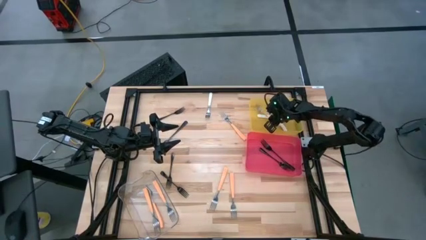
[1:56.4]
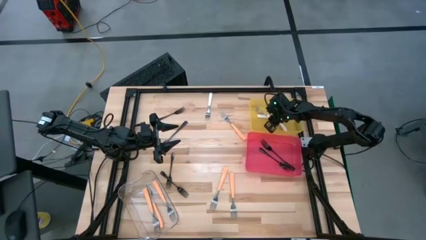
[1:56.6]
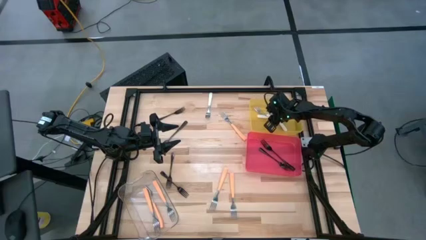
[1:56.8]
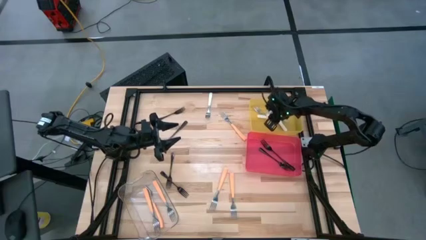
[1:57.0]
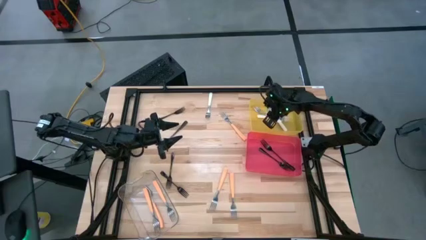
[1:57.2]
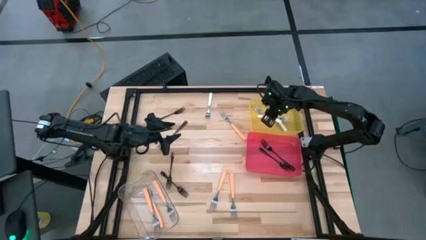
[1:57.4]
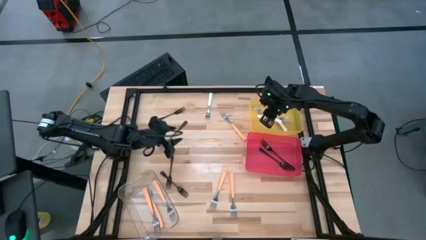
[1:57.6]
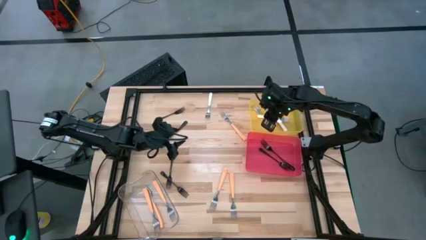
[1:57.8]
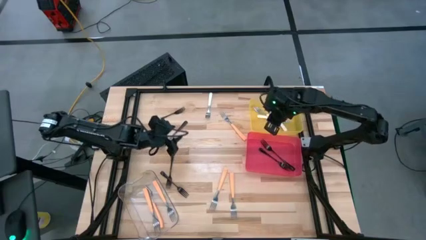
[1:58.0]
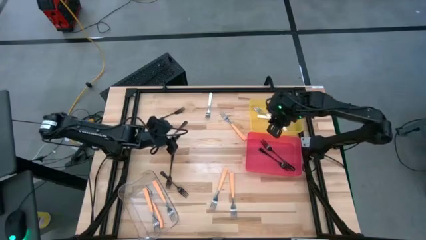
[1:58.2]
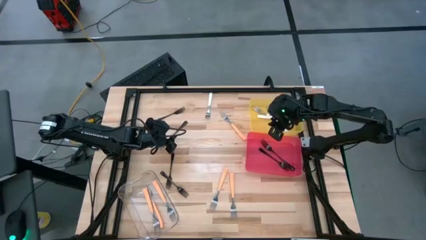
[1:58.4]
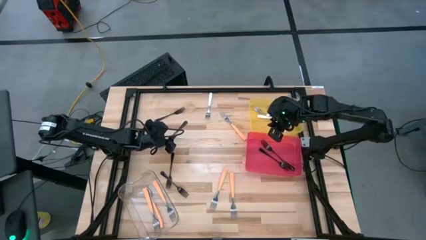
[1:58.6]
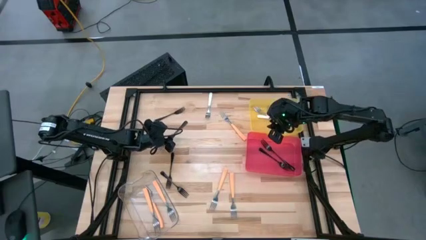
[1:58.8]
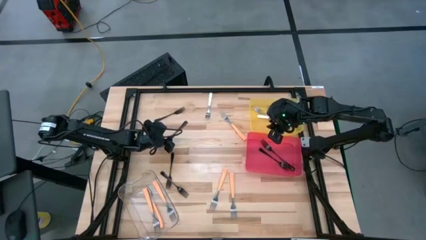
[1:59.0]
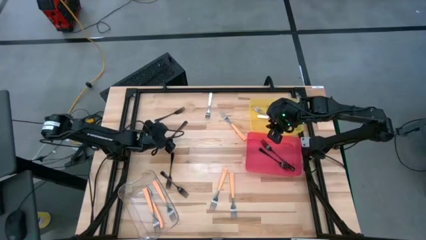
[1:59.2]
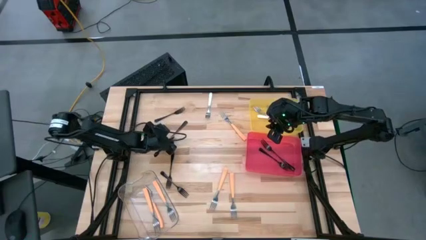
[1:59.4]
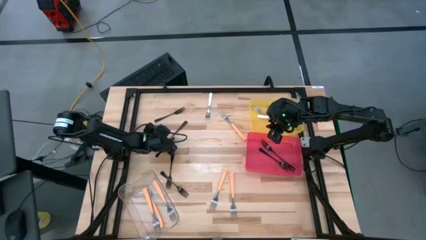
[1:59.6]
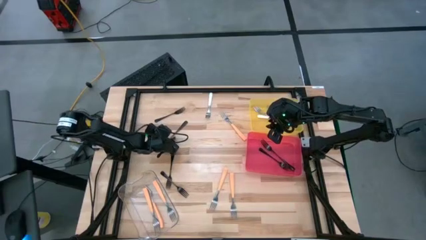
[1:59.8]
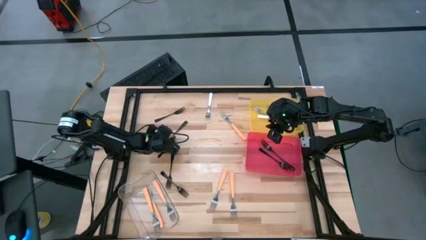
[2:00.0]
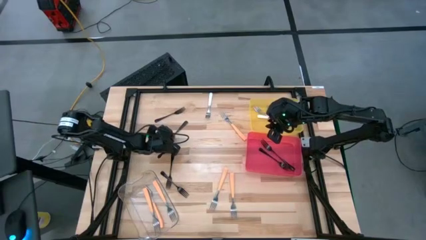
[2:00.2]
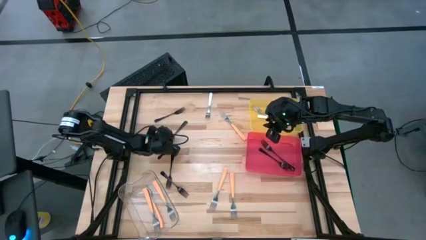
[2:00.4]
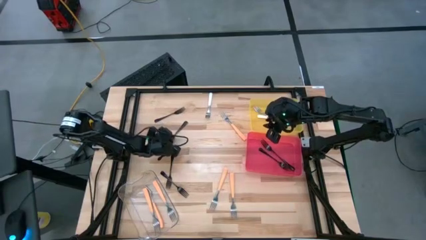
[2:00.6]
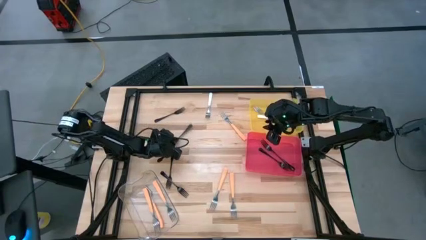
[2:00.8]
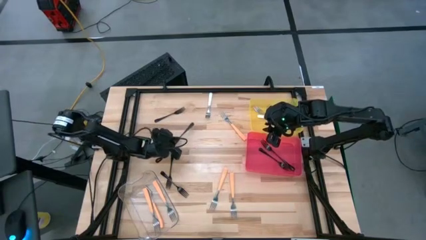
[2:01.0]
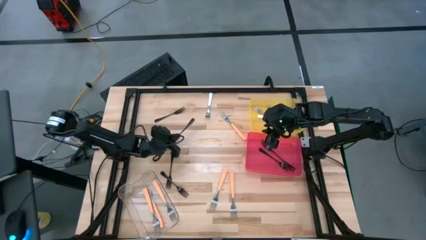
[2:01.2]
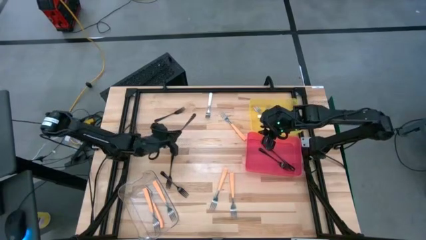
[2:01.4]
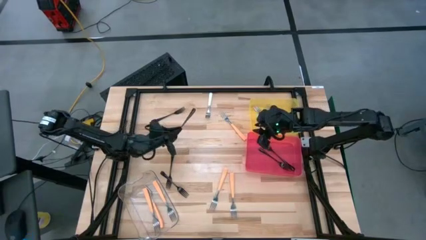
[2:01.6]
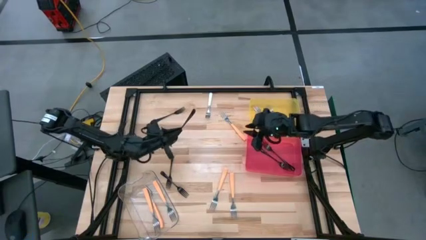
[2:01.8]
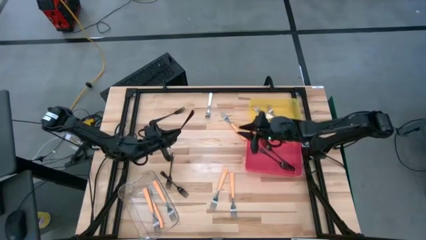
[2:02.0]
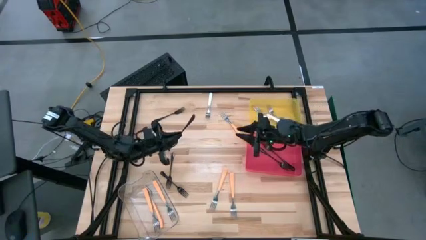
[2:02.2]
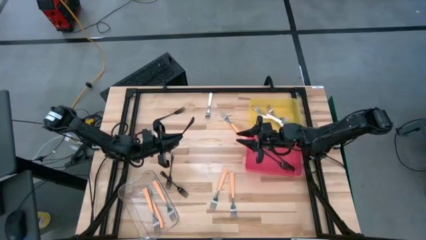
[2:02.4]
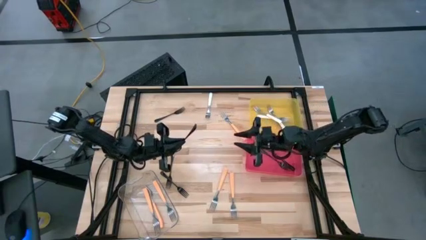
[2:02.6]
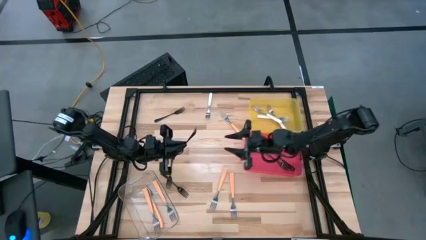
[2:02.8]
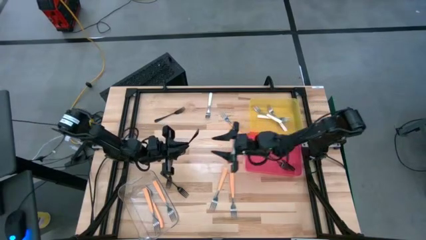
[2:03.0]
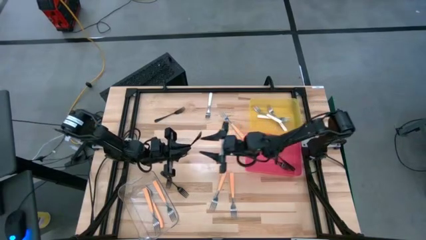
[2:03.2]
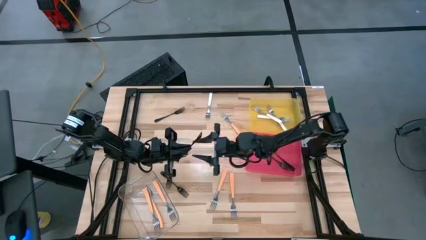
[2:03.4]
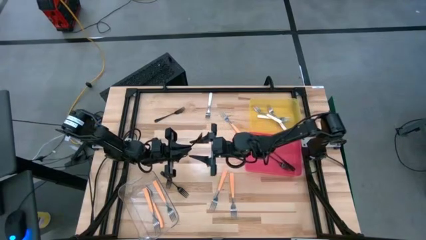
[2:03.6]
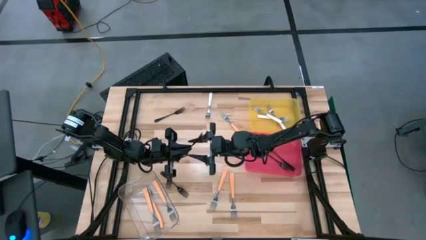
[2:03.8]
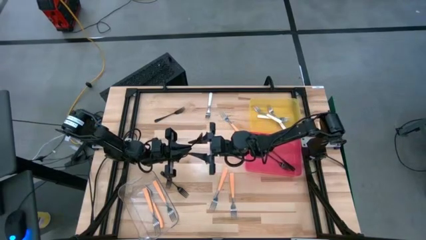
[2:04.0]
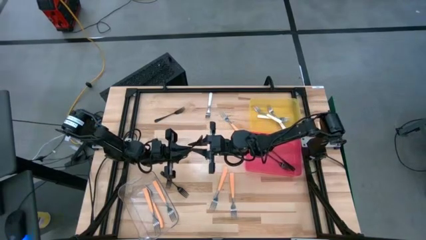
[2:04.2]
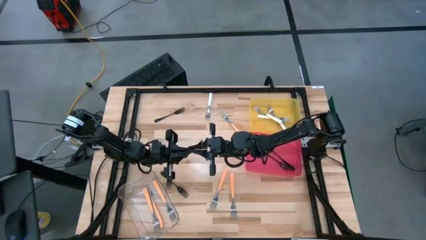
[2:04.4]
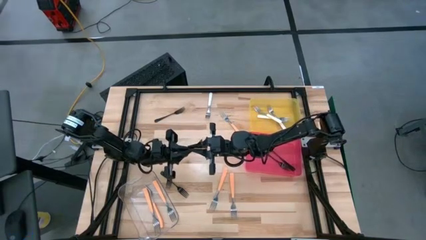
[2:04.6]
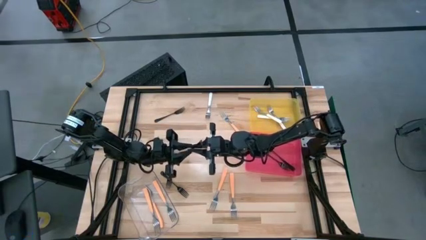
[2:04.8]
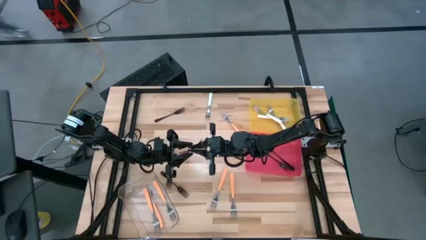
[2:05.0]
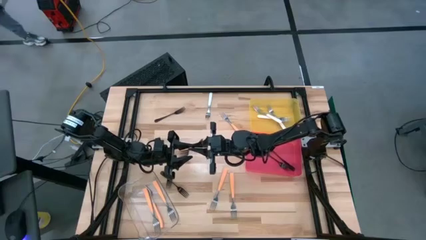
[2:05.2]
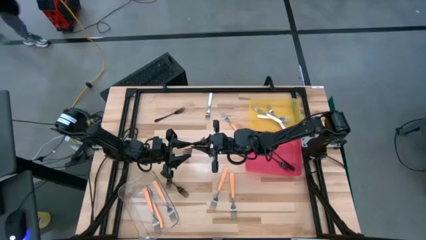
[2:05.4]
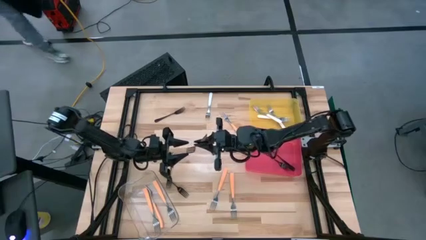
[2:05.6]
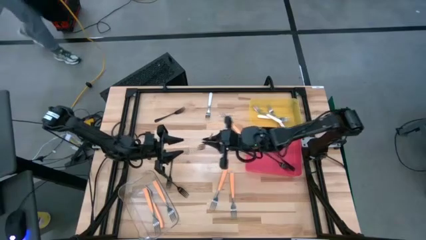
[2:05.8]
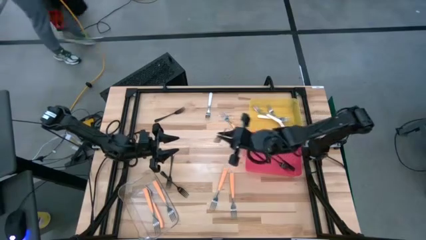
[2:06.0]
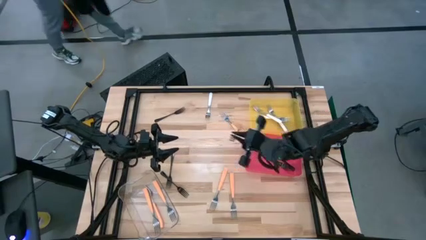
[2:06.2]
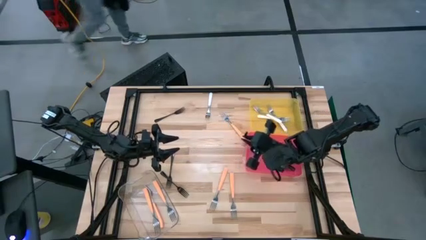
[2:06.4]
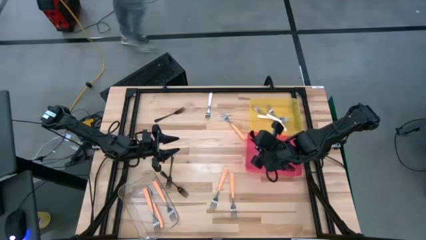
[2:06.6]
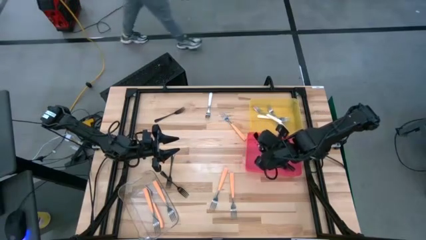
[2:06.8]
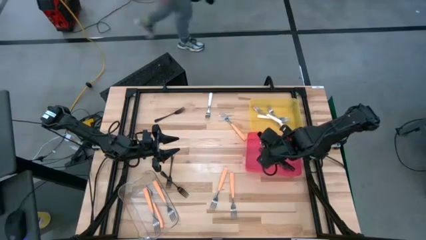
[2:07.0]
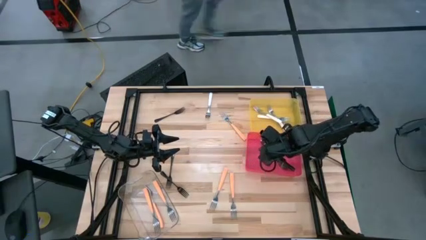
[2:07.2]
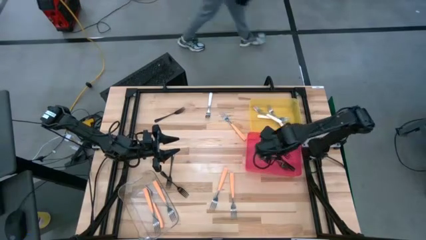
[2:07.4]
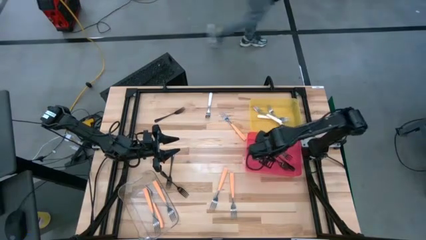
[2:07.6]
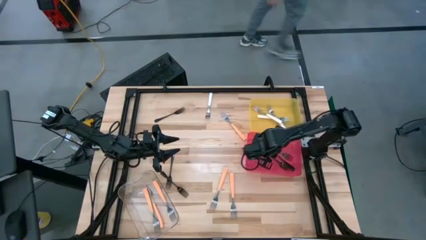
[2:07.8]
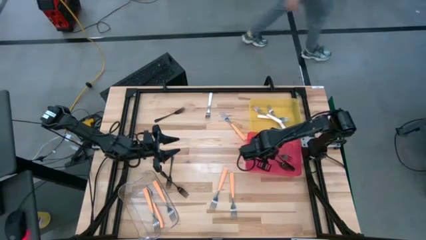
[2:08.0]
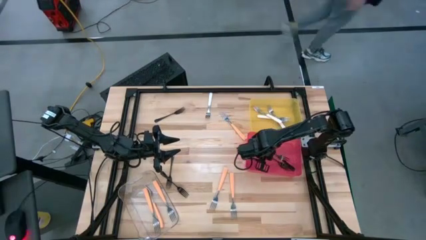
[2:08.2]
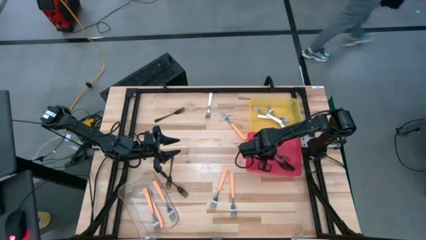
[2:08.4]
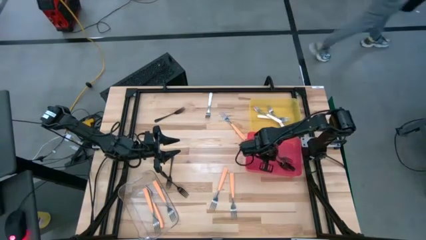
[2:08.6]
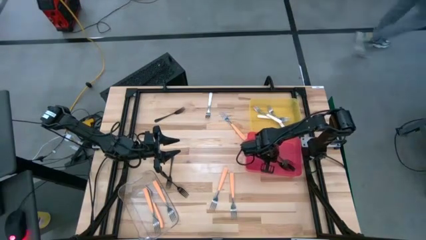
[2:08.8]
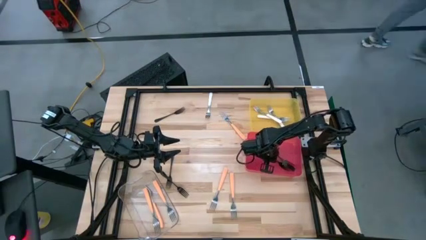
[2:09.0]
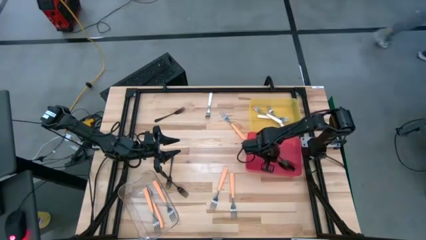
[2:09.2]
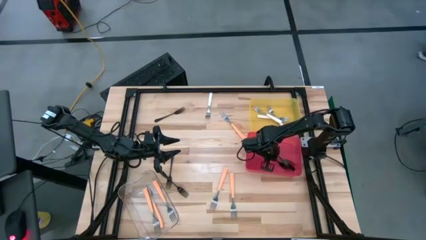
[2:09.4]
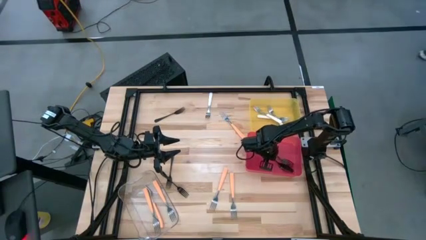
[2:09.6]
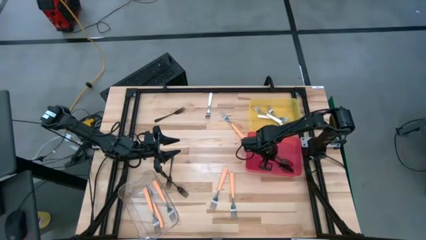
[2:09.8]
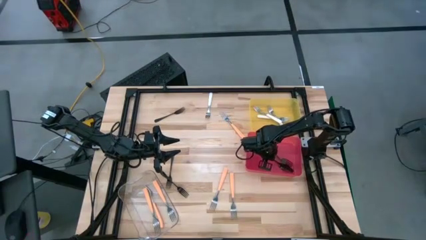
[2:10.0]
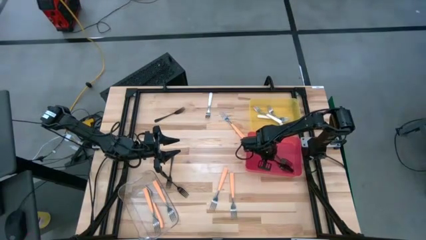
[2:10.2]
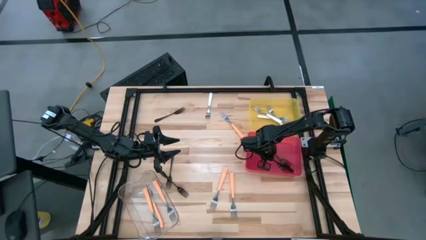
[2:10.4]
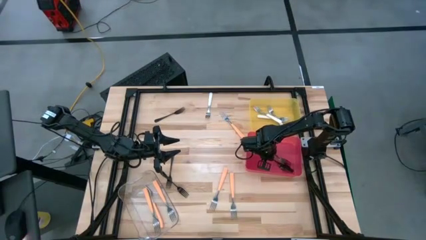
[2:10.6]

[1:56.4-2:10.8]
Task: Sort silverware by color (type)
Put the black fork into the red bin

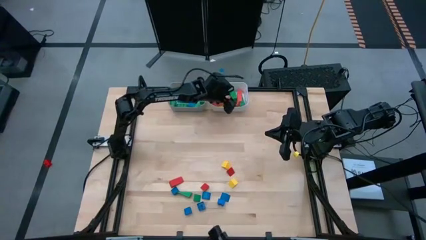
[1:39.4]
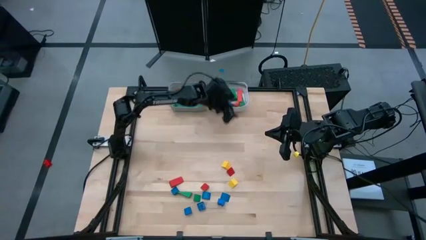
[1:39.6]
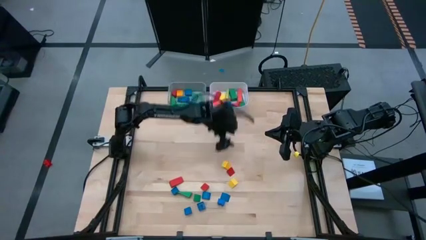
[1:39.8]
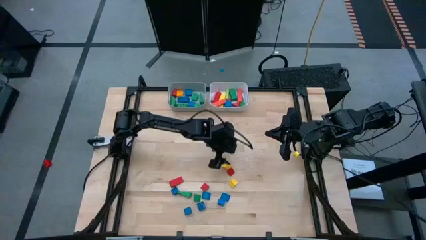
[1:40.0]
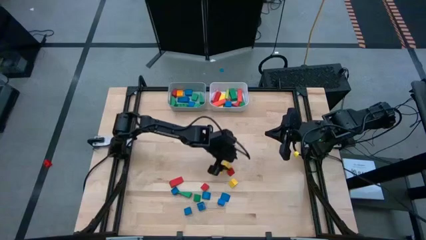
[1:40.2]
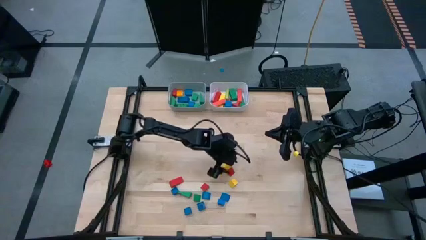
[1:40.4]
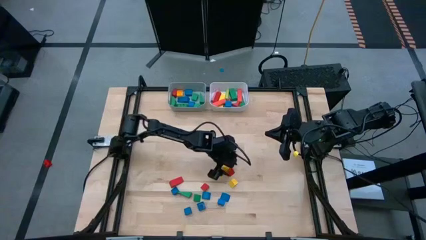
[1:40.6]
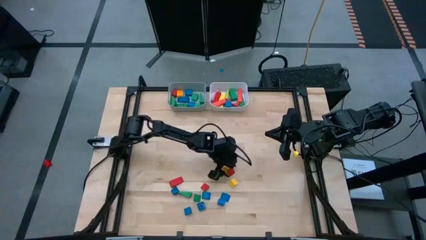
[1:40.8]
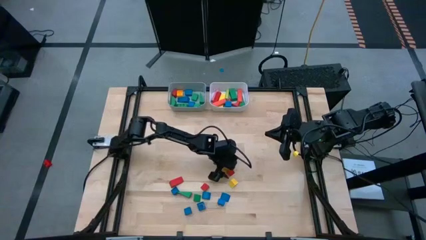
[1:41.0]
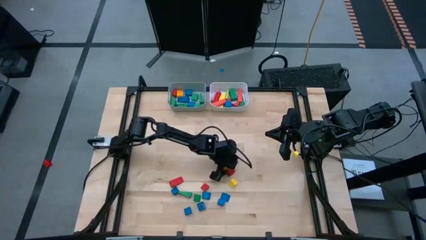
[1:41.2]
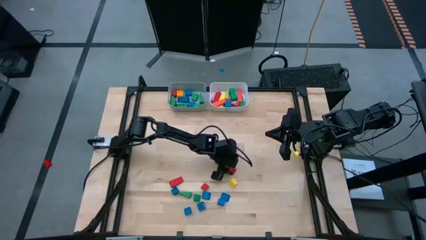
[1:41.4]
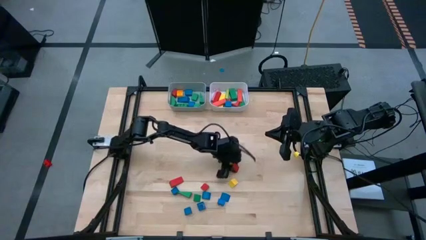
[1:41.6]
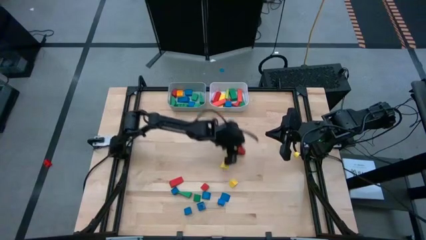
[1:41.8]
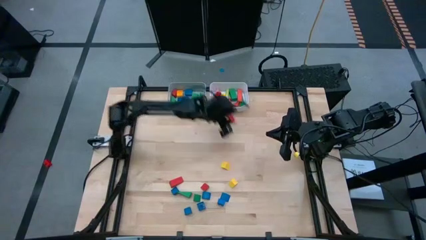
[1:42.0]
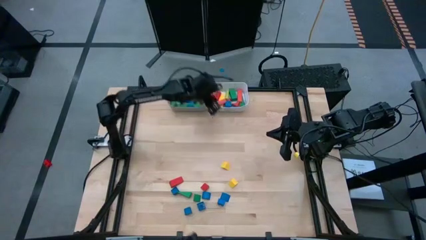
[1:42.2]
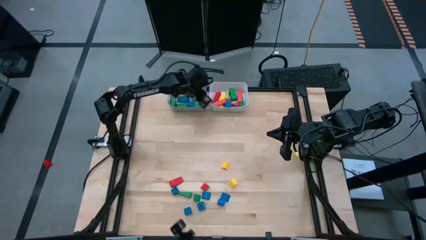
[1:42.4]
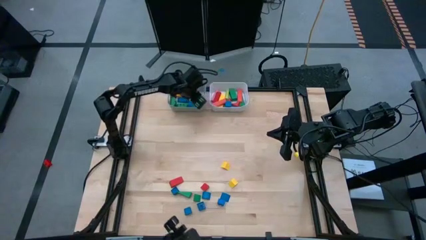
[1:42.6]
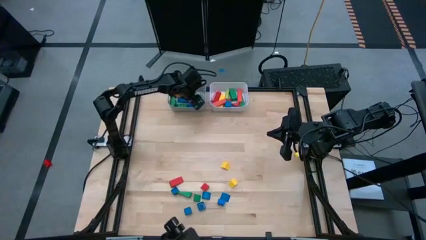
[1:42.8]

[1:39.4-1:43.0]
Task: Sort blocks by size
Put the red triangular block into the gray bin
